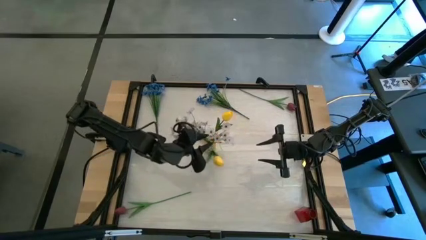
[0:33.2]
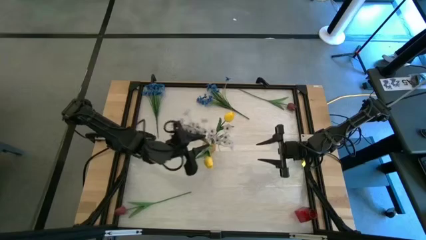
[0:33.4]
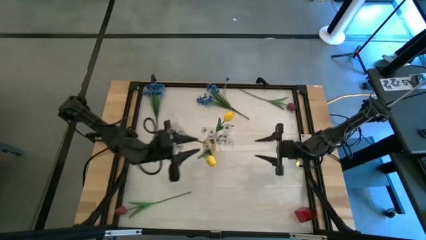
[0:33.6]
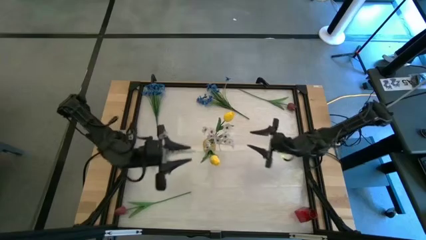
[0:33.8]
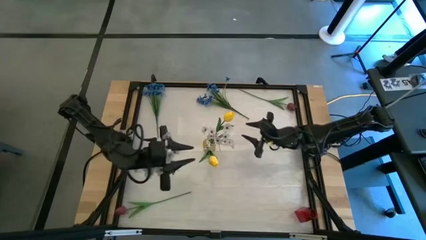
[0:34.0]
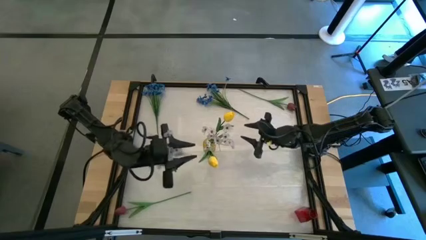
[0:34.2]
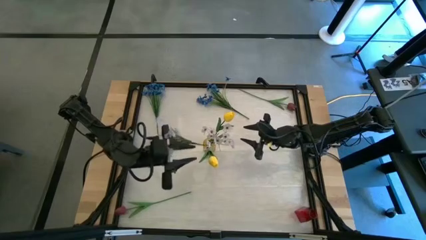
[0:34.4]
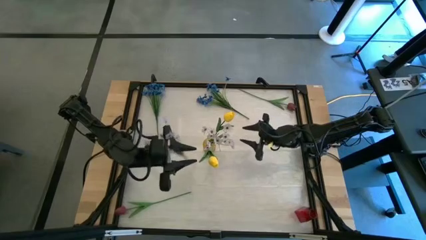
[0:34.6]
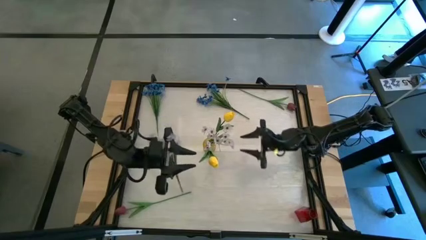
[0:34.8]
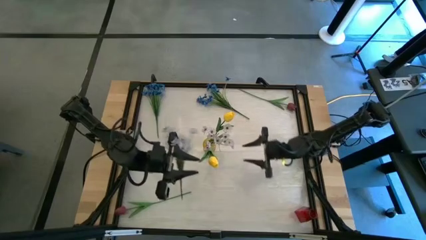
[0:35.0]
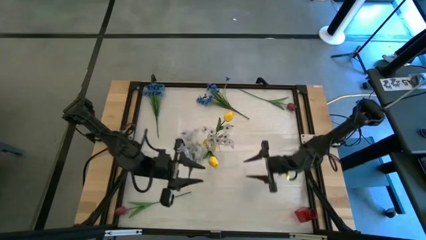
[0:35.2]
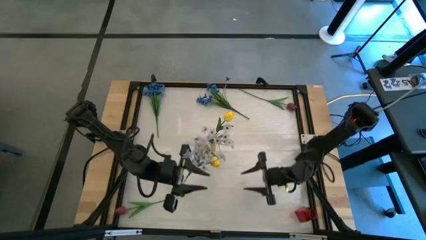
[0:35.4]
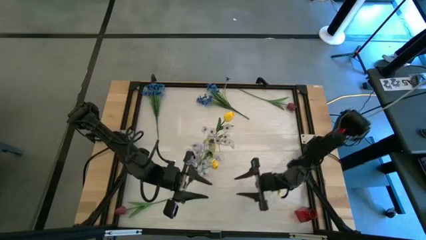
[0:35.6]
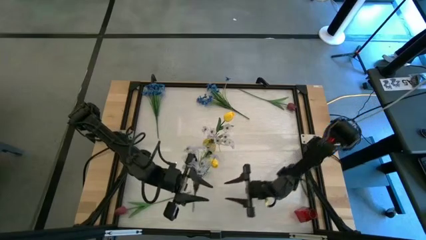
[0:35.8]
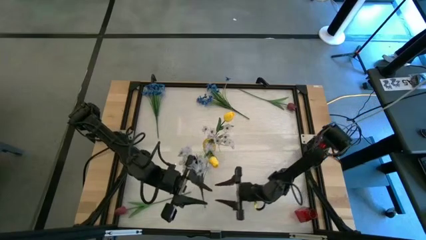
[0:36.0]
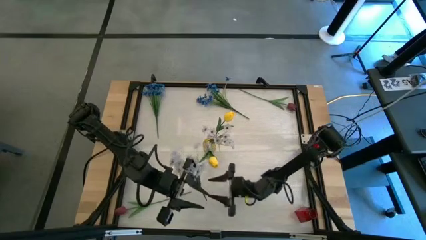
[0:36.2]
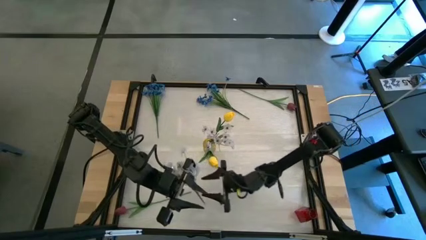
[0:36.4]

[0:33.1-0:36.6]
Task: Sort flowers into vase by color
Put the white flower into the yellow vase

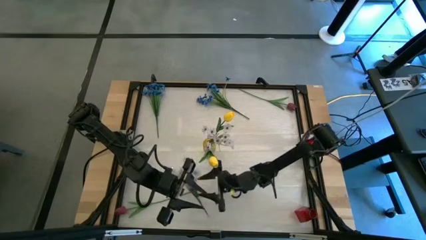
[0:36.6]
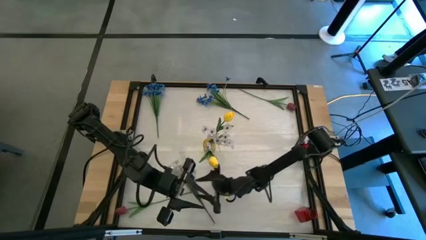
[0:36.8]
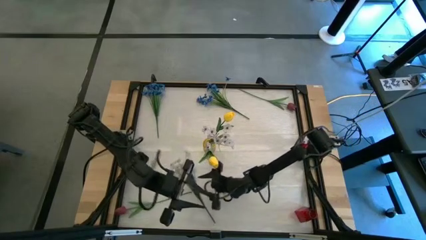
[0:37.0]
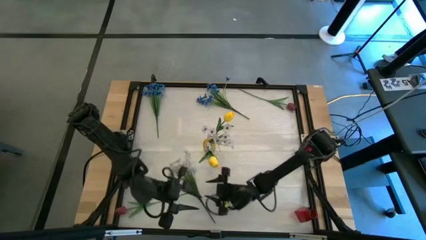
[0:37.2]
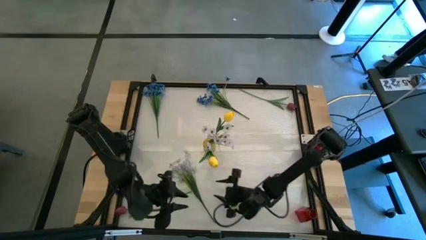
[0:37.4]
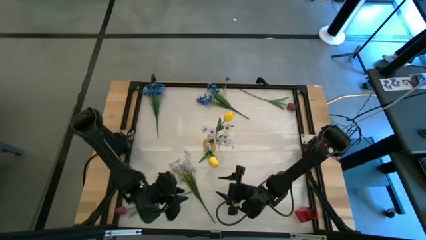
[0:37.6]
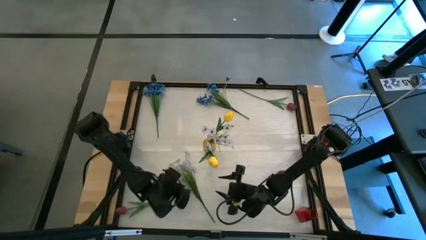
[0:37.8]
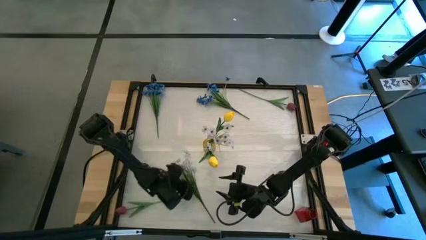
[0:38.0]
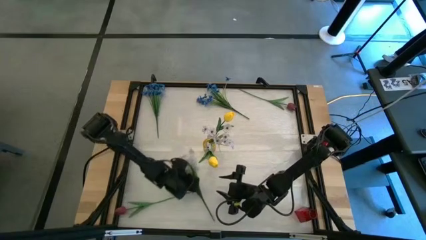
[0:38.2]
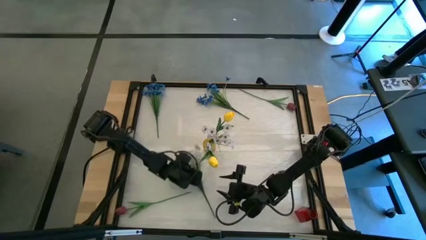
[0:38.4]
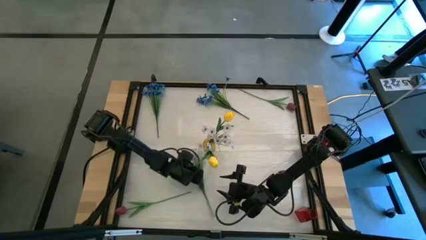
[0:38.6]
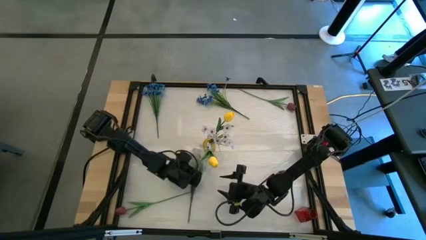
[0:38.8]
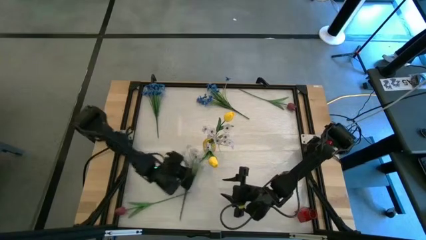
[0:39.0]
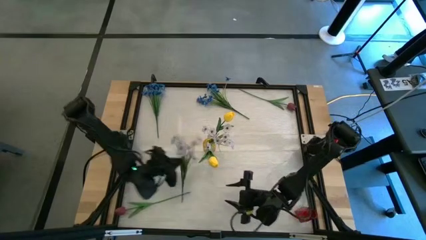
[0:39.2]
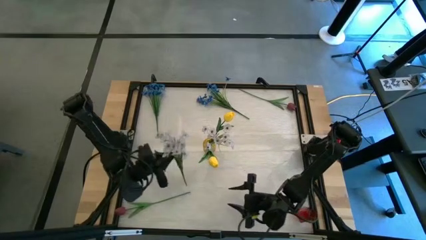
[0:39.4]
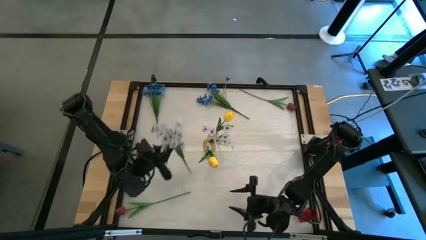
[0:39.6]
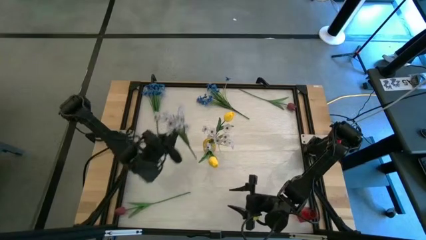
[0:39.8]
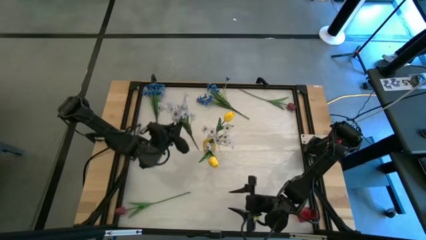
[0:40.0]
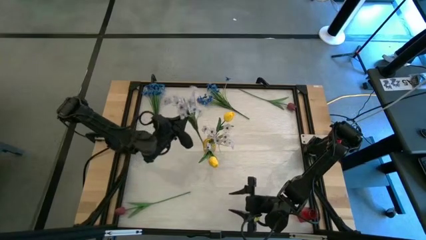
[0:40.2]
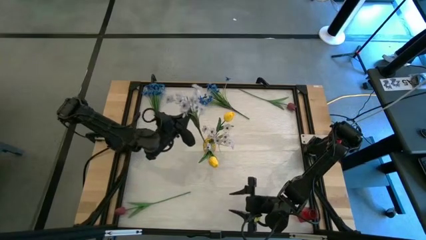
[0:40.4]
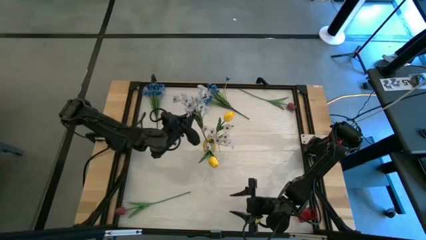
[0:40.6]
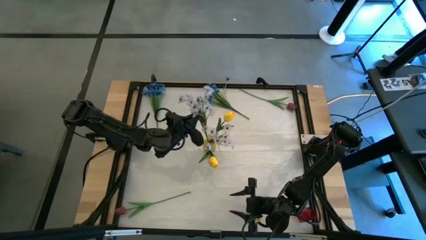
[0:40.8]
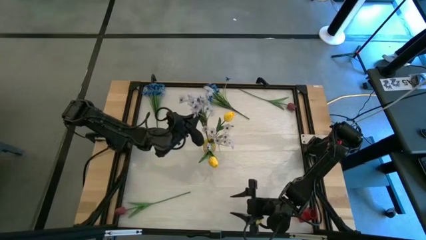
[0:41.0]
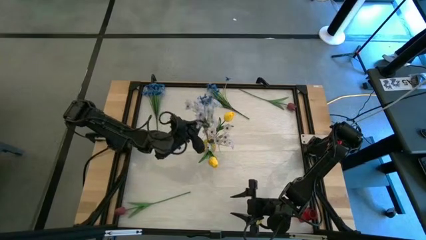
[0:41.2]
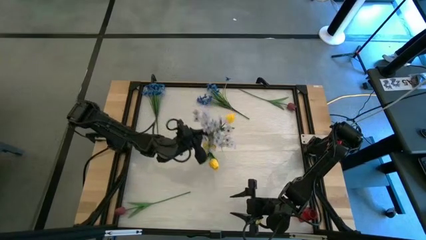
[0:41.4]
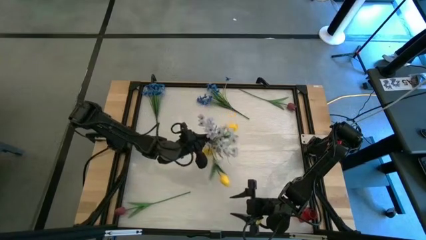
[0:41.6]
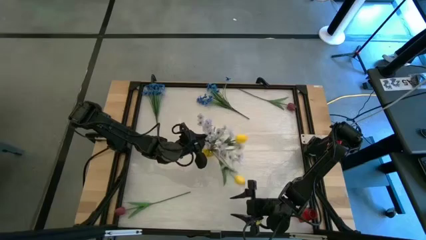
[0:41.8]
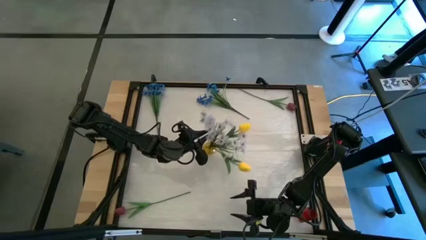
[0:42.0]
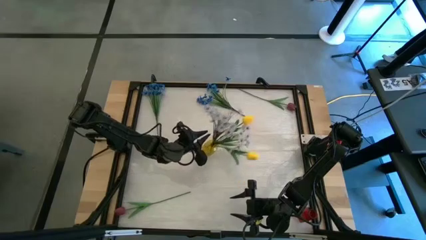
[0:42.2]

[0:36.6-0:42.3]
Put the white flower into the yellow vase

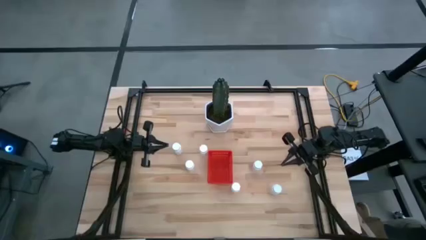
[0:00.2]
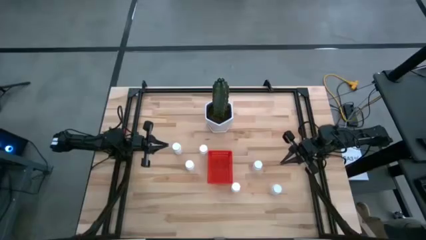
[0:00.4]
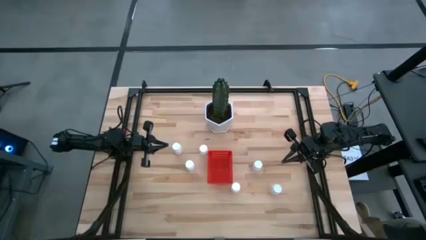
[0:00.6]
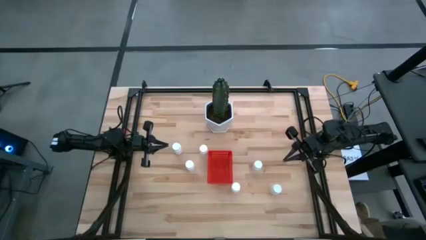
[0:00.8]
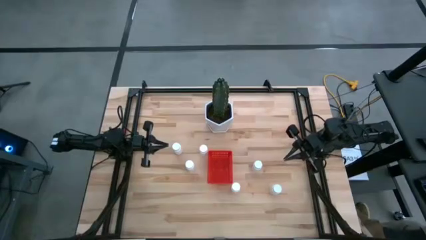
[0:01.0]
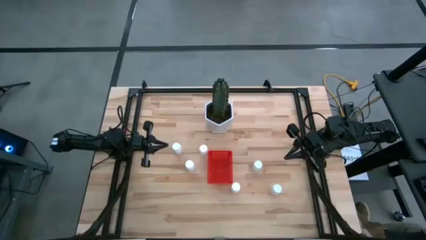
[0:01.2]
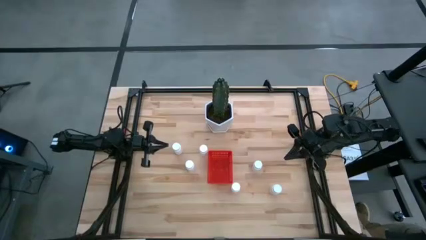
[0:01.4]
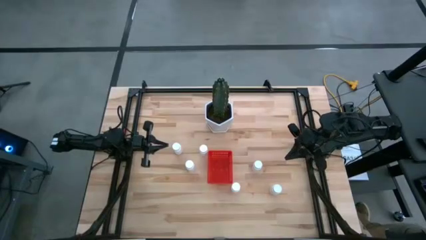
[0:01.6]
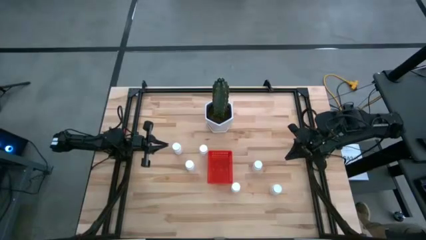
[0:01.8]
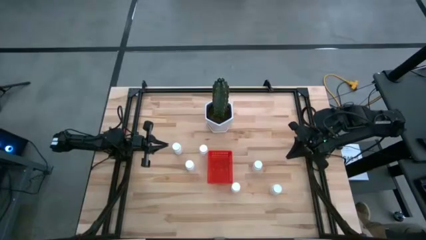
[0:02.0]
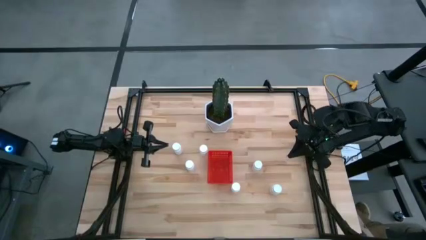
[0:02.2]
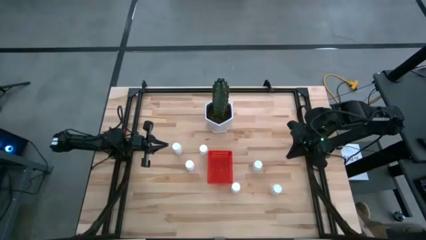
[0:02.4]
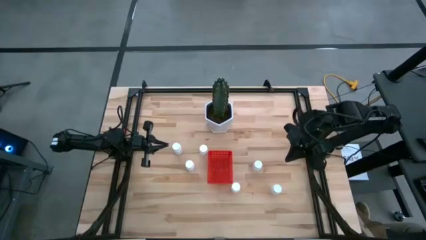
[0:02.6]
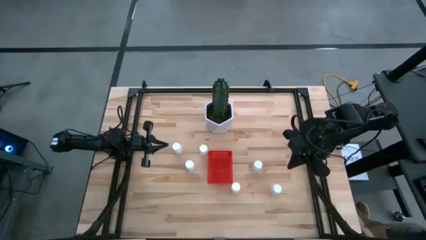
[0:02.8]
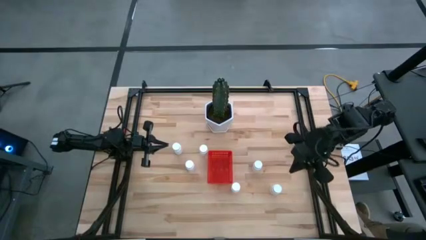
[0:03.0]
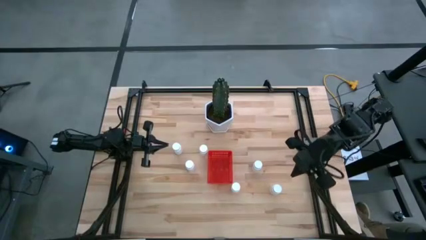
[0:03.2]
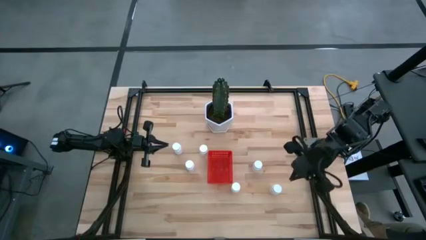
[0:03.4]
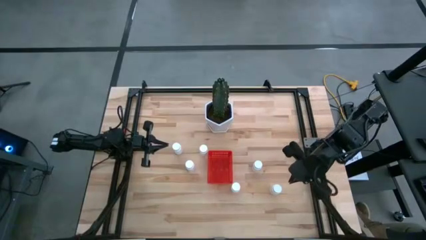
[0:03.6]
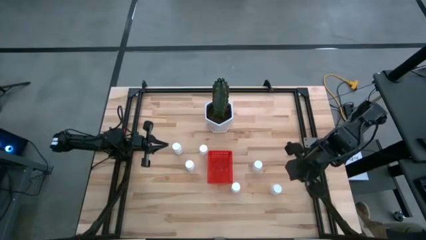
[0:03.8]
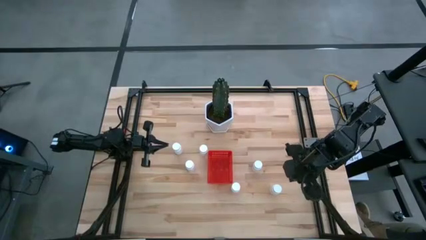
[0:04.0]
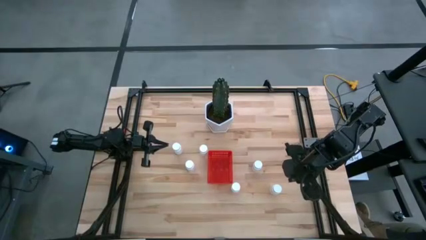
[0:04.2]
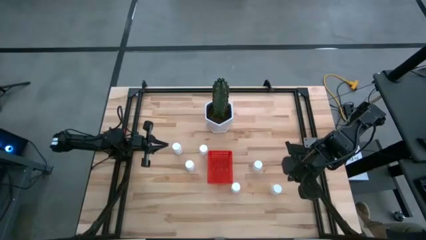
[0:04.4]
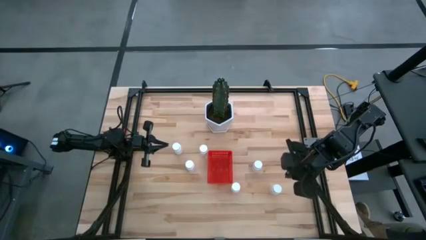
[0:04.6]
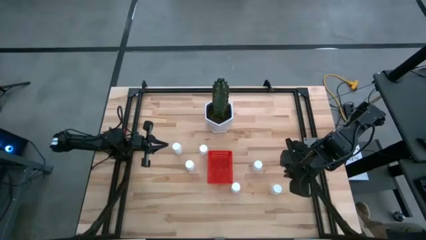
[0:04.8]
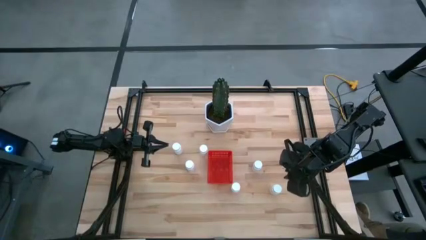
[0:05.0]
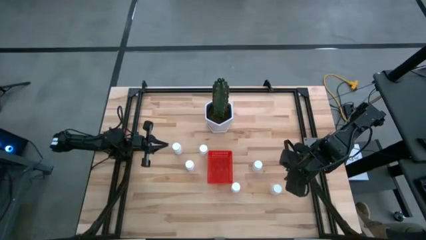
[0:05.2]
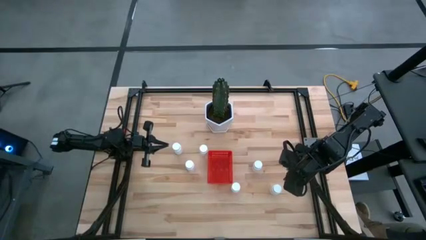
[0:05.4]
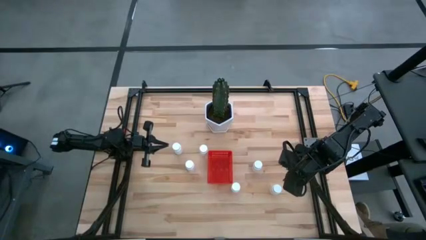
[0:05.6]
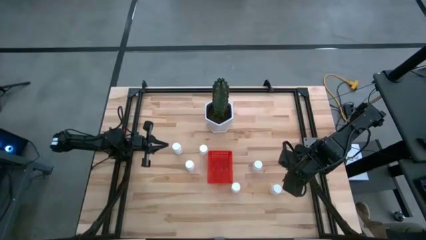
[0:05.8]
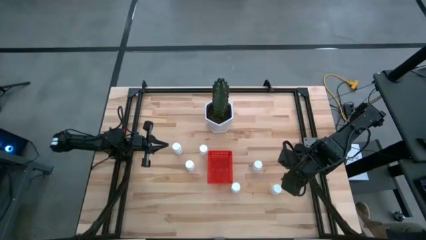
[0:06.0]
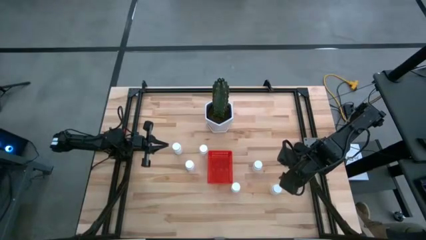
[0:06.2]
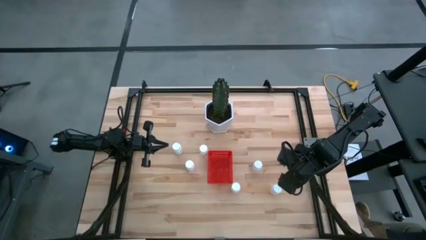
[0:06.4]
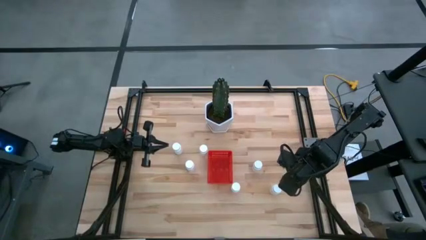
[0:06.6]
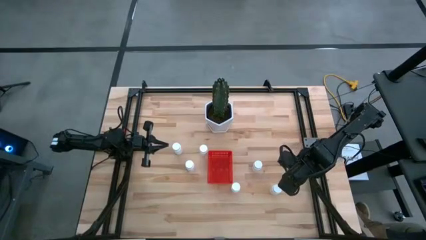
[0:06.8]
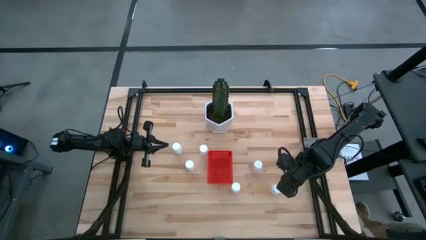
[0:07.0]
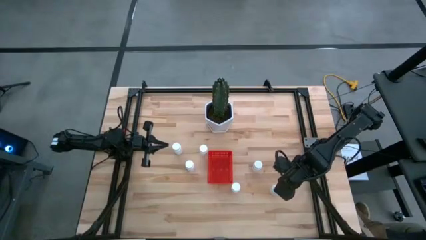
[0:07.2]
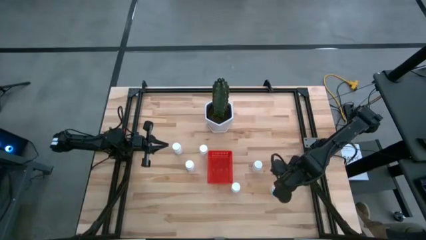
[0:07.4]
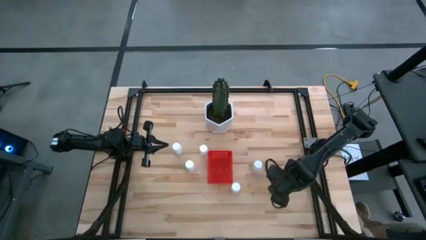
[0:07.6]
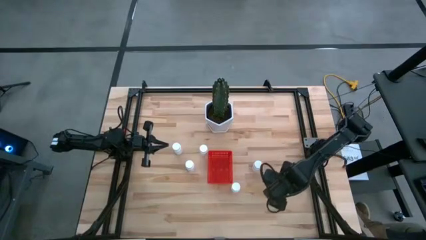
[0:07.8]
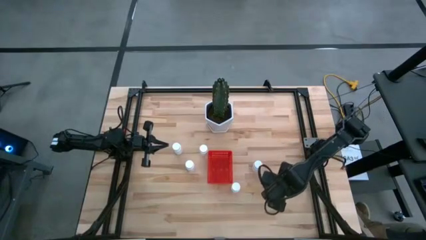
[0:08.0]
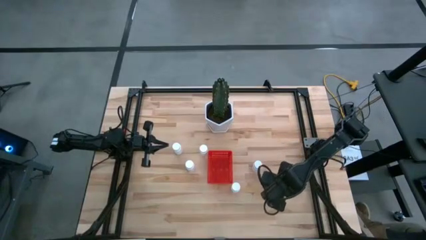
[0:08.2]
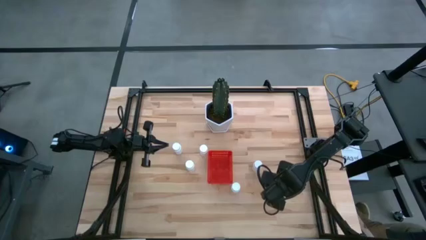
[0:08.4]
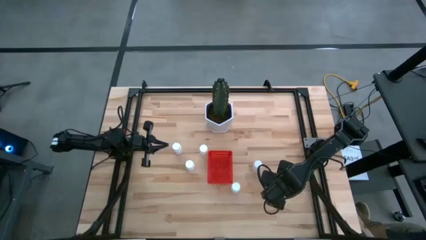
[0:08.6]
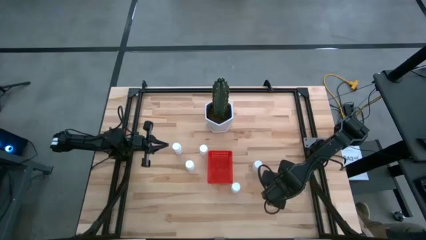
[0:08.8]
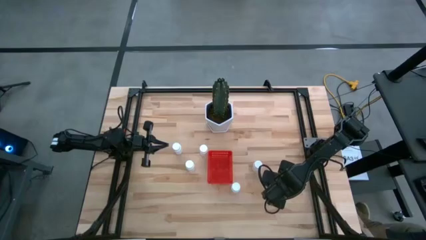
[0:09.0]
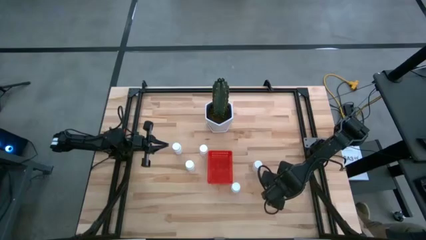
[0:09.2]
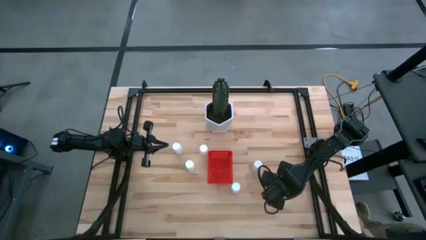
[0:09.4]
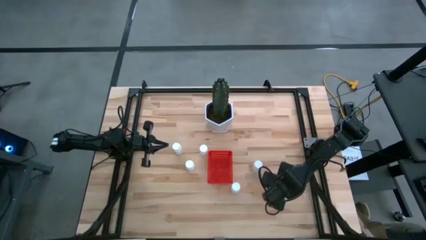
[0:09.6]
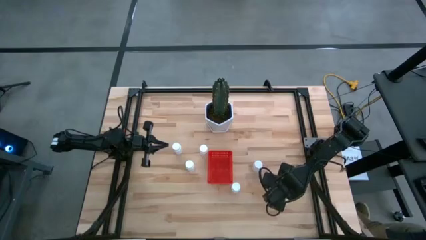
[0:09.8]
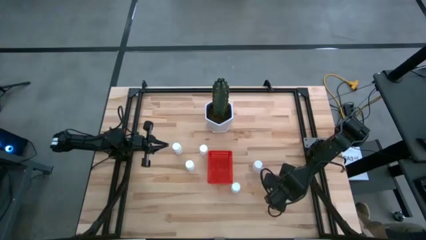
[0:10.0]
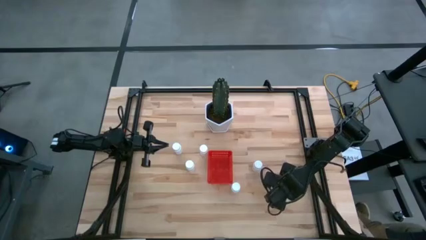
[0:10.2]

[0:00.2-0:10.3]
Task: Pick and place pill bottles into a basket
Put the white pill bottle into the red bin
